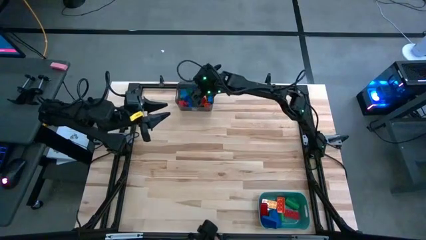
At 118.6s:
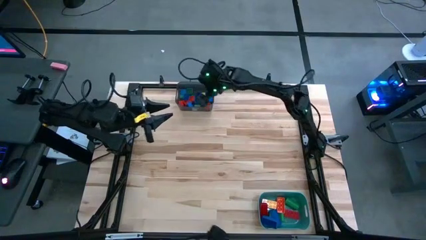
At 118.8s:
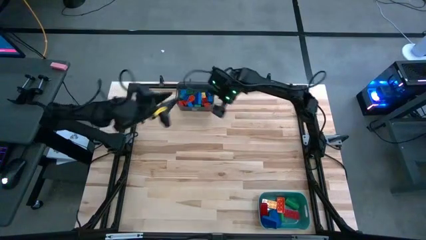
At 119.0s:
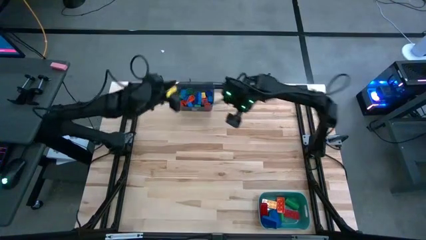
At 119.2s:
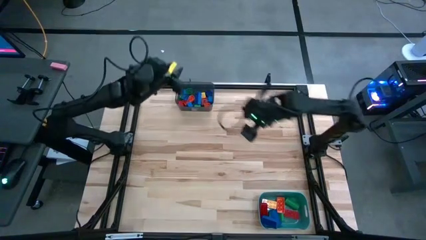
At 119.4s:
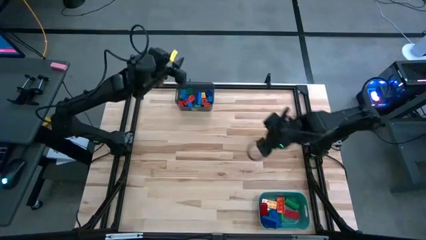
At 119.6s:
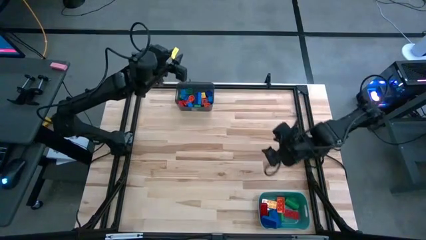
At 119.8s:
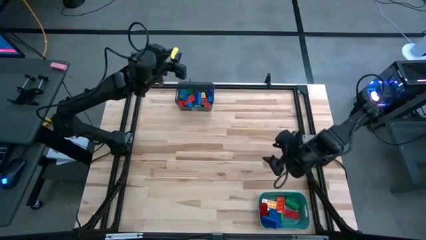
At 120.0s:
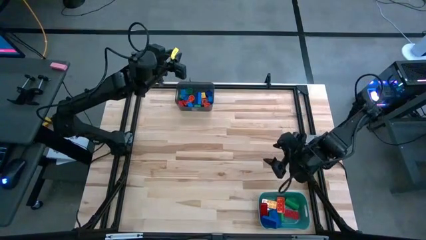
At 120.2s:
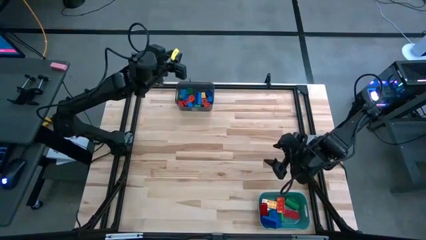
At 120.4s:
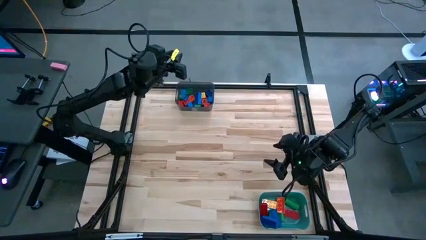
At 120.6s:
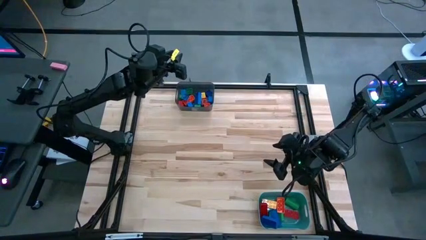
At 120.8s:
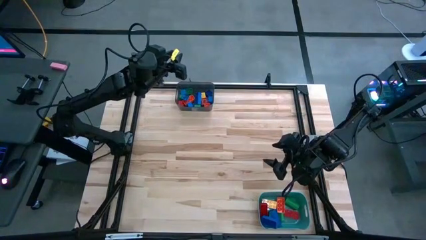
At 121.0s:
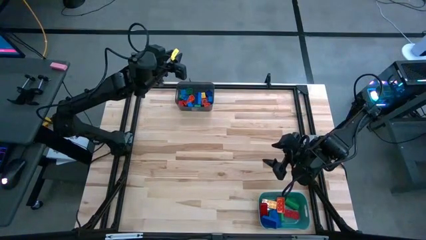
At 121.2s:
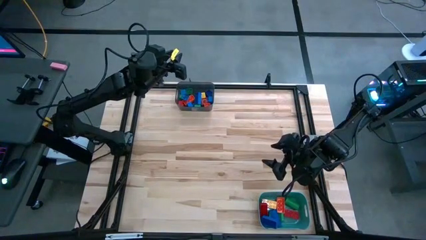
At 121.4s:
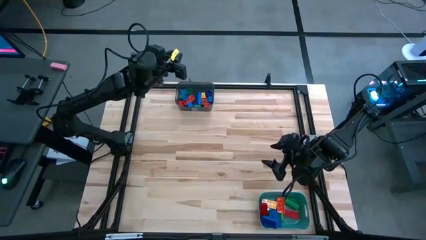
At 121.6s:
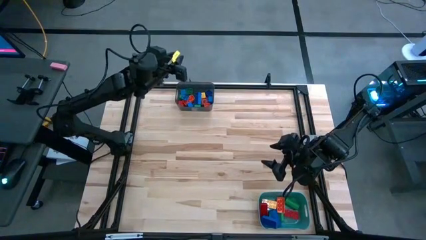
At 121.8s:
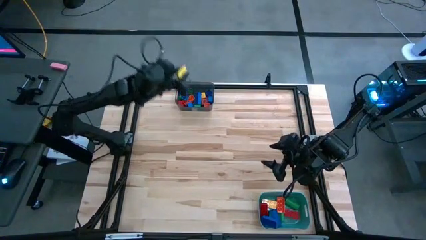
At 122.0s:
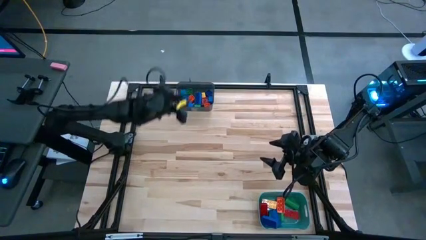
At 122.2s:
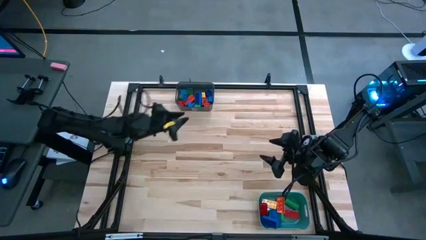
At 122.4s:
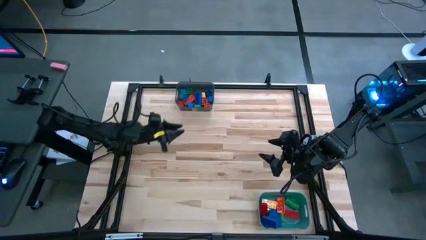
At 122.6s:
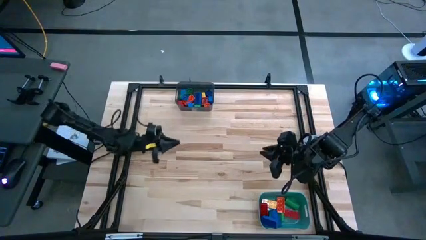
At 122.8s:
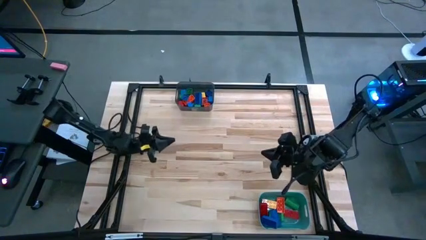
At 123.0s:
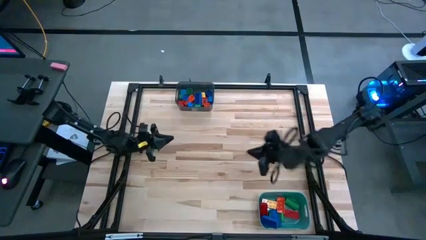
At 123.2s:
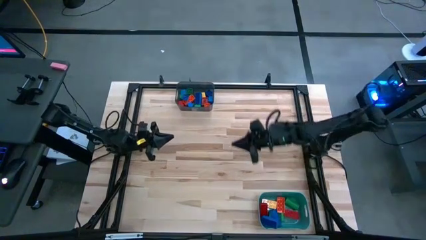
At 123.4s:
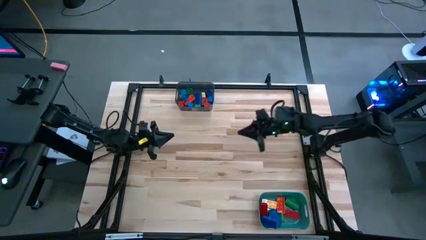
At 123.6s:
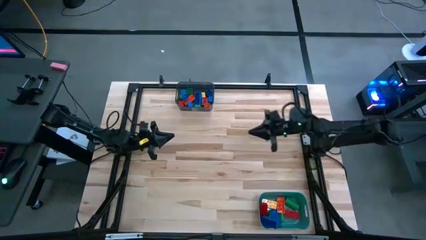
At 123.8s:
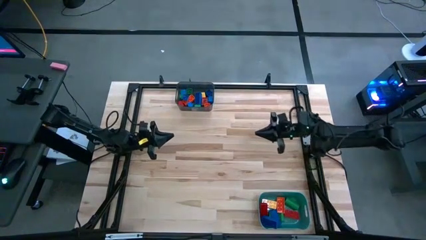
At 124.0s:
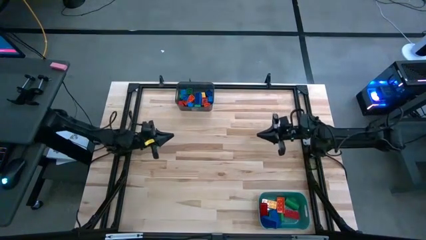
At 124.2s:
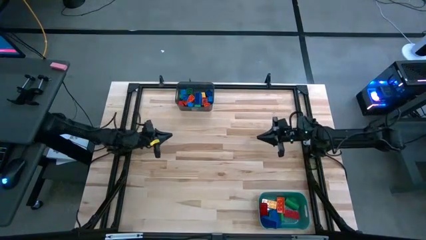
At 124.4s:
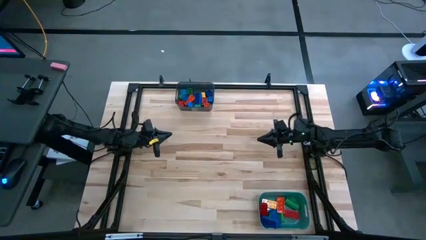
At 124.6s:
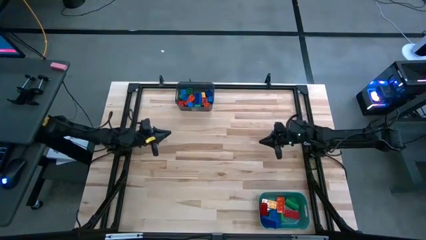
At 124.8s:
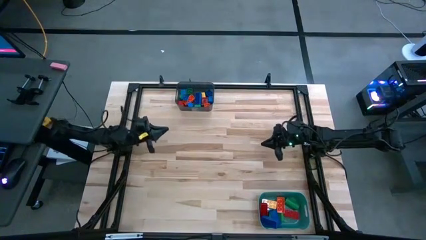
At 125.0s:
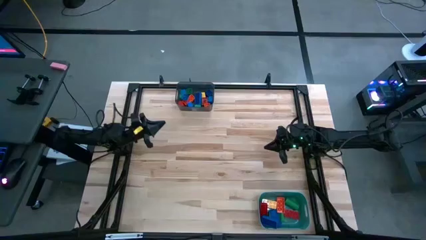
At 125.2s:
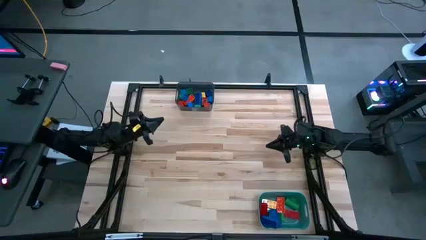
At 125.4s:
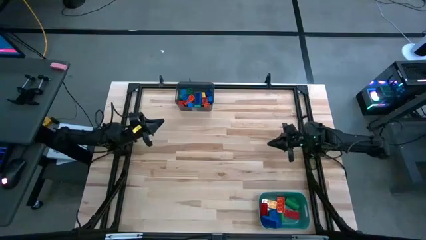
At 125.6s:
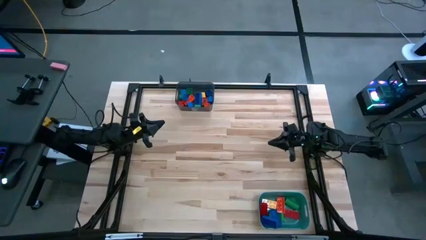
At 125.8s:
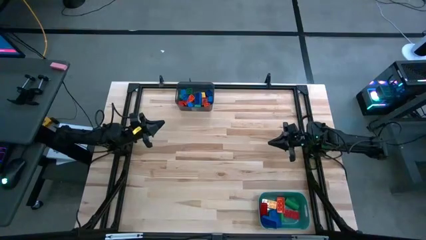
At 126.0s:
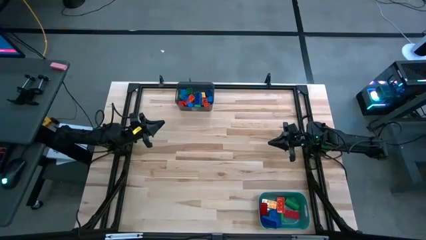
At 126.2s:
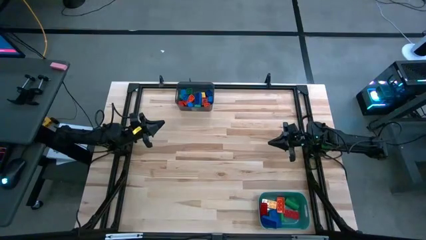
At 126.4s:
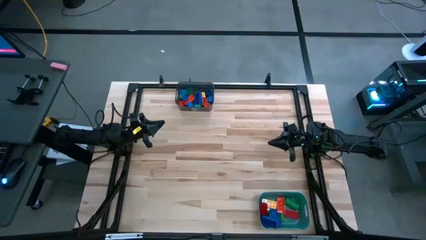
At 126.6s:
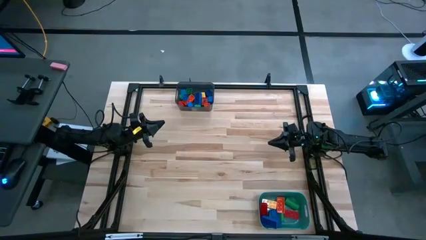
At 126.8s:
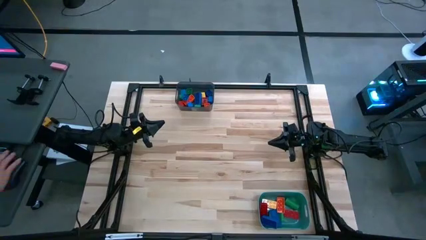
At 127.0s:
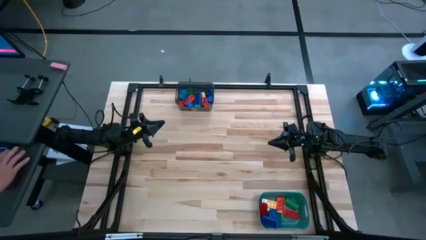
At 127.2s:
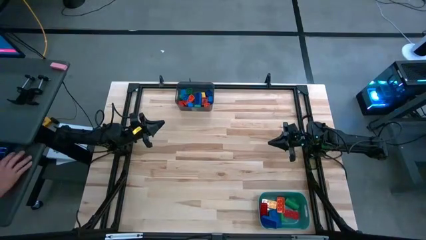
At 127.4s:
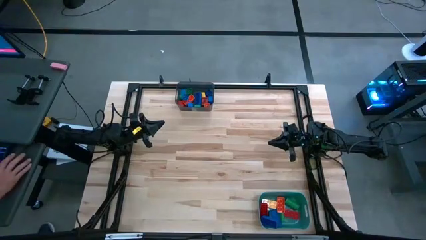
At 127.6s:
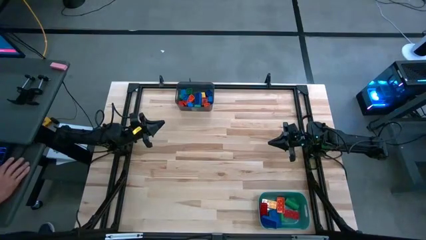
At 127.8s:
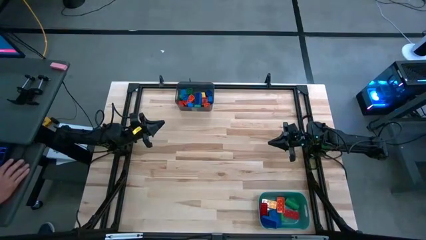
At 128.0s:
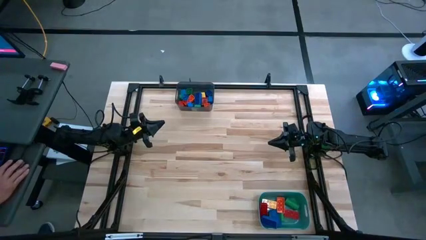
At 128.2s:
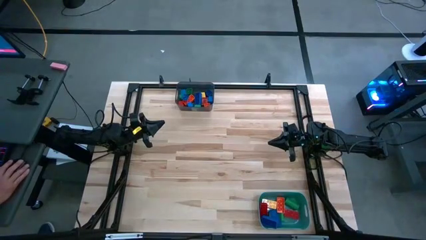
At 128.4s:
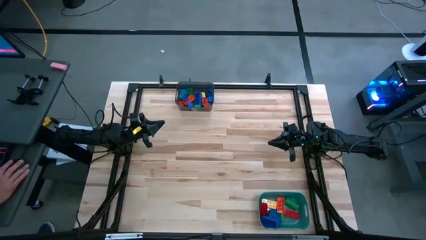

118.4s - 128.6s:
Task: Sort blocks by size
Return to Home Position

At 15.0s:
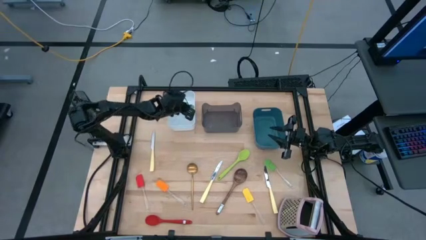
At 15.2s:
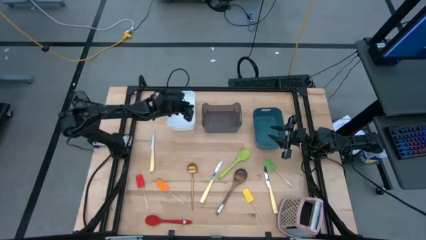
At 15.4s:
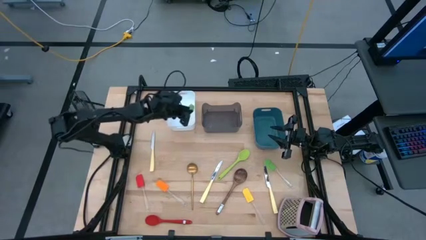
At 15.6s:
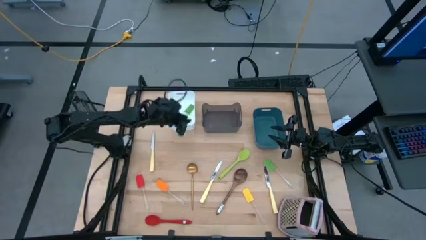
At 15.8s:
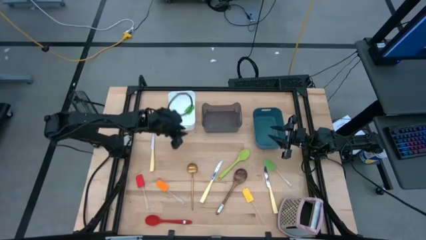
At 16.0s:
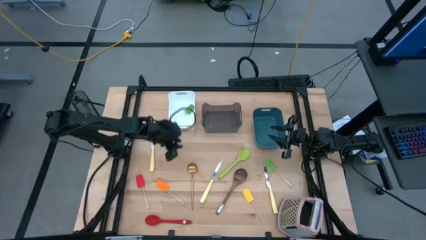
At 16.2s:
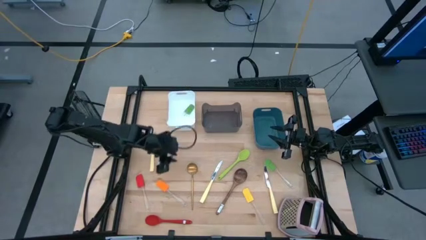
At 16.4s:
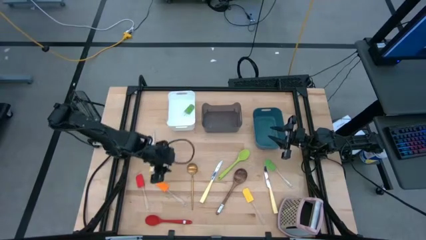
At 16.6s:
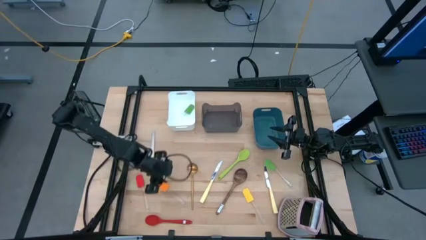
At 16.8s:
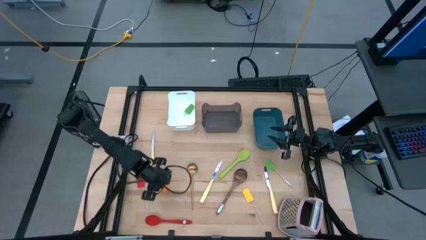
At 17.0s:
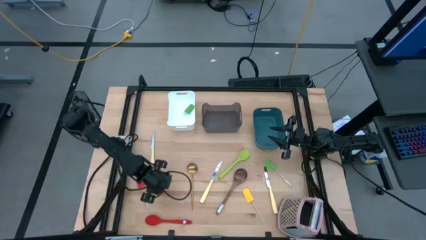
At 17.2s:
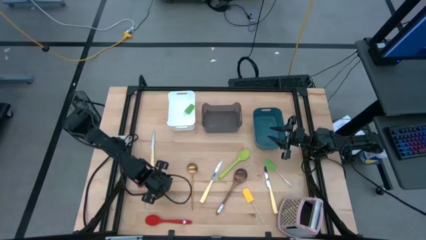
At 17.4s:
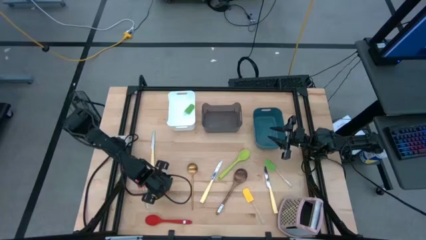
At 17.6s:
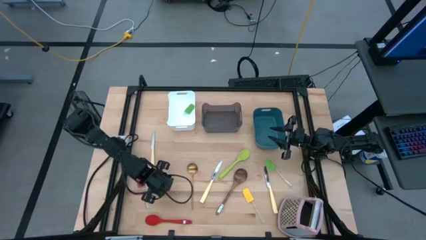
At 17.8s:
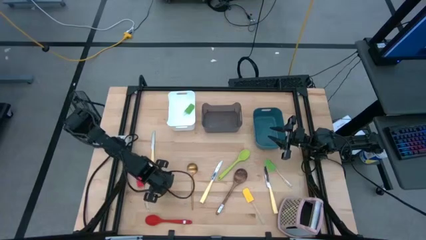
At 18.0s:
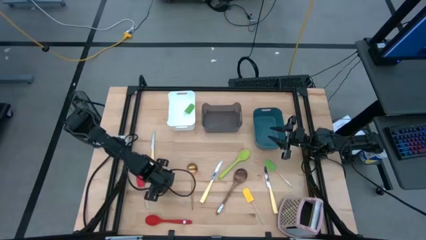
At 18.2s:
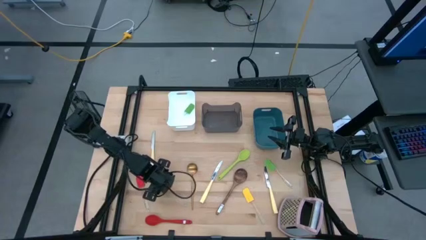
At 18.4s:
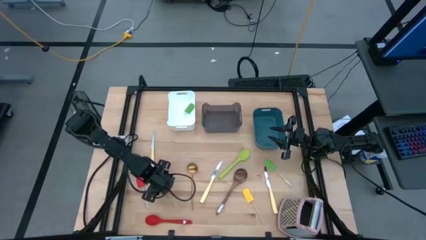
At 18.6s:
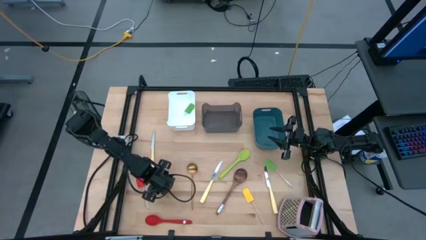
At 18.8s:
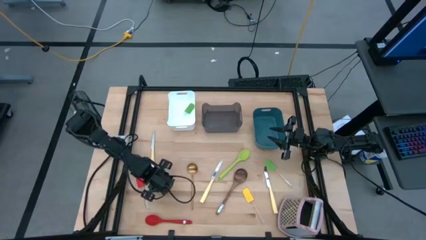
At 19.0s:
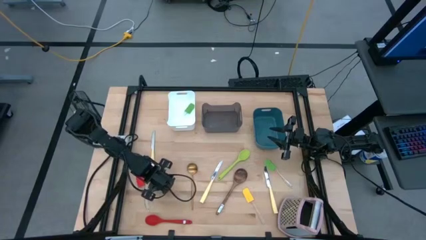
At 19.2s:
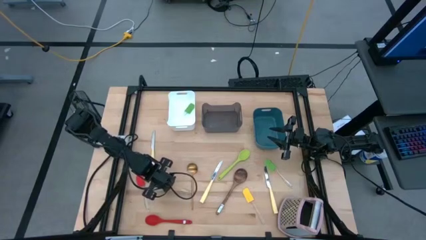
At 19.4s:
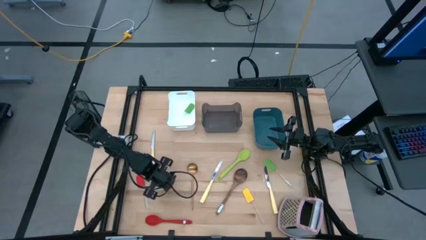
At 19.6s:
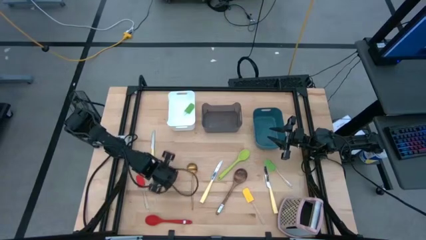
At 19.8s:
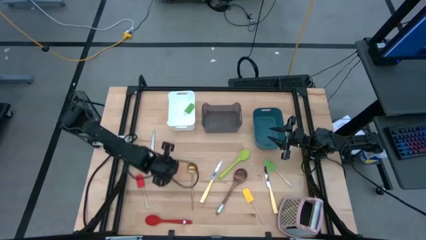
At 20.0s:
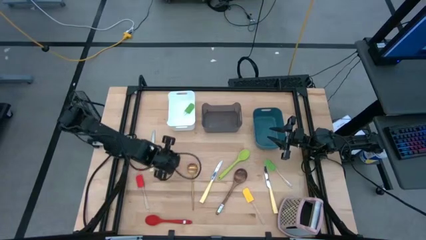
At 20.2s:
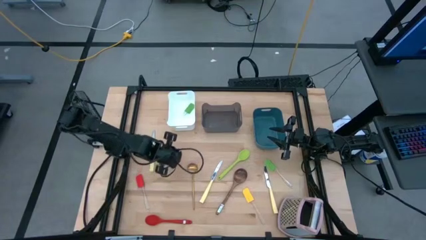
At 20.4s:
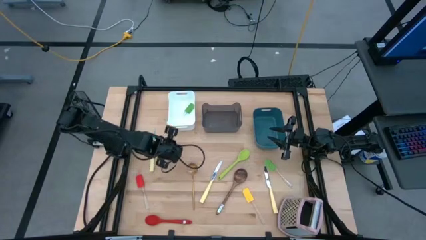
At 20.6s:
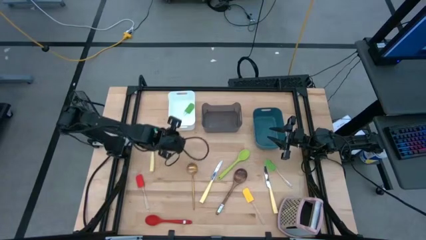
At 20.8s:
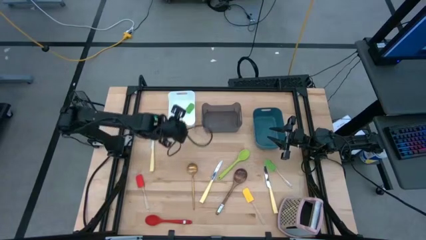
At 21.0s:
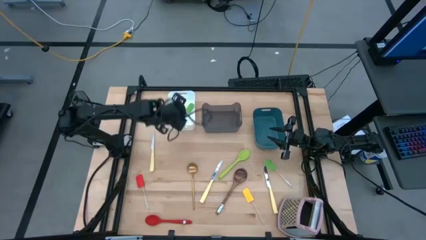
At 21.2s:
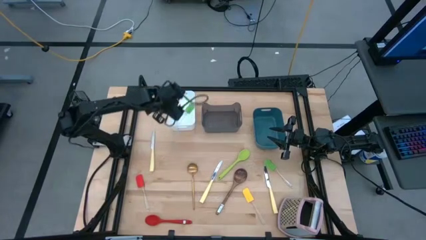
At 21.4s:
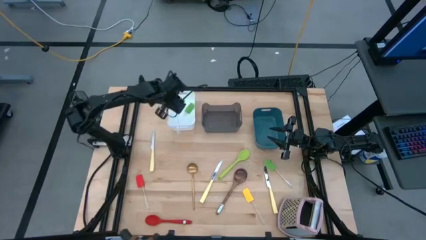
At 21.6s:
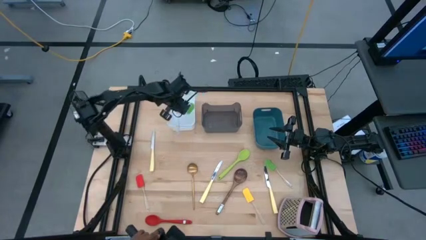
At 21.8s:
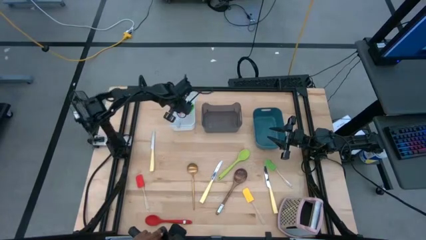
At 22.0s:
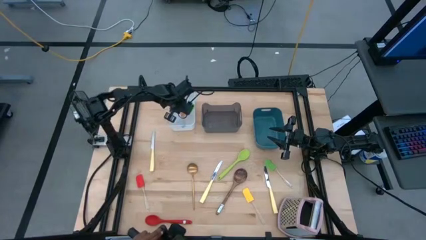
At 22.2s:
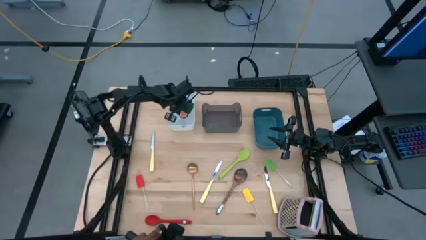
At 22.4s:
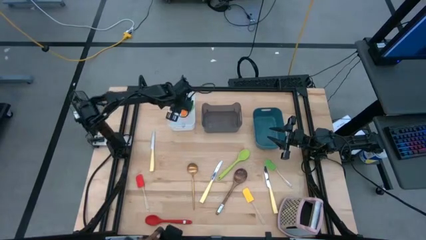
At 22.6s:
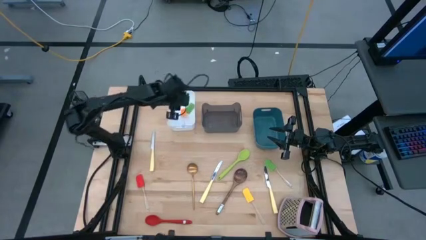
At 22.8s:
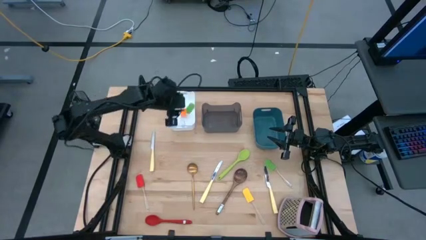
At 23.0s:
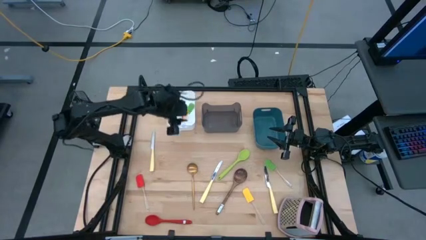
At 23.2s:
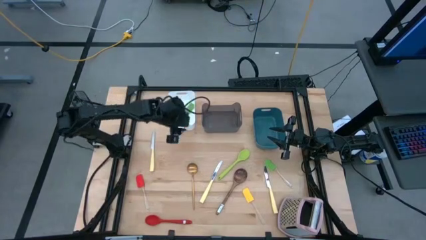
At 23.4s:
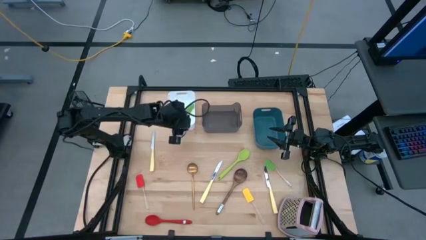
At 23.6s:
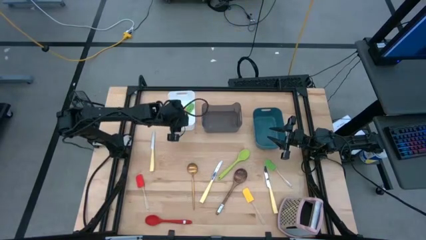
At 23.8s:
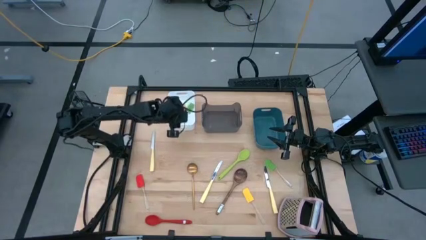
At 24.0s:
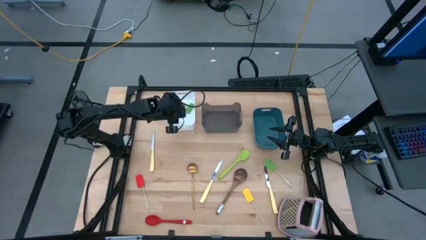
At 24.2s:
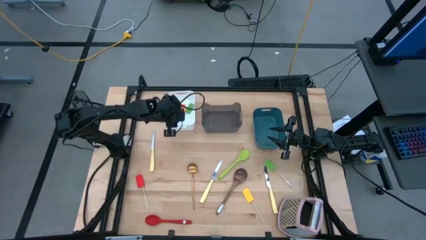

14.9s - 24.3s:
Task: Pick & Place Kitchen Items
Put the orange spatula into the white bin
